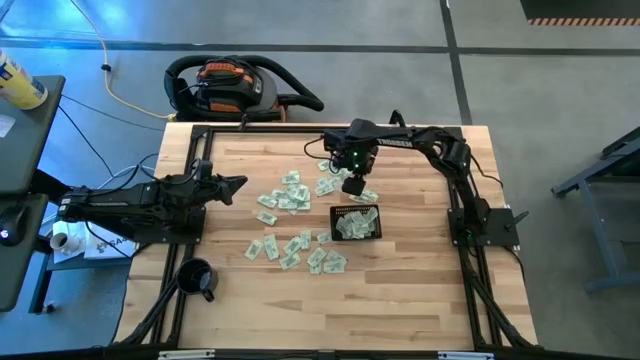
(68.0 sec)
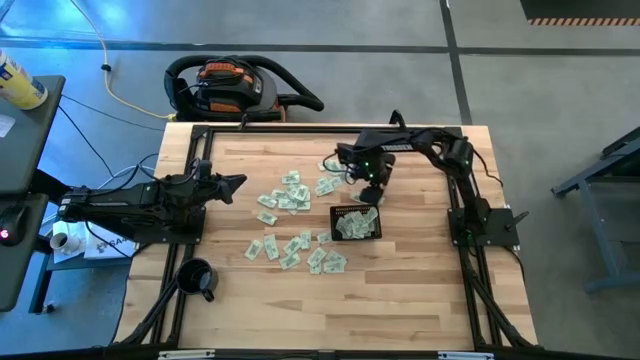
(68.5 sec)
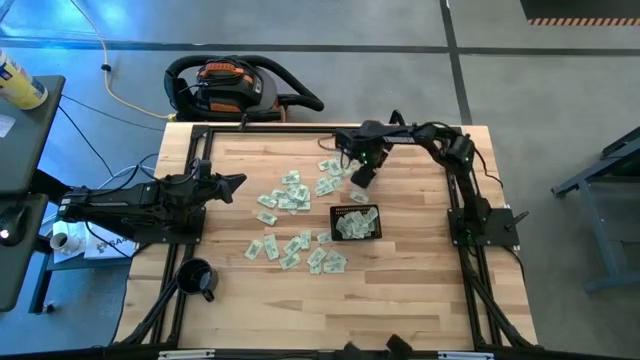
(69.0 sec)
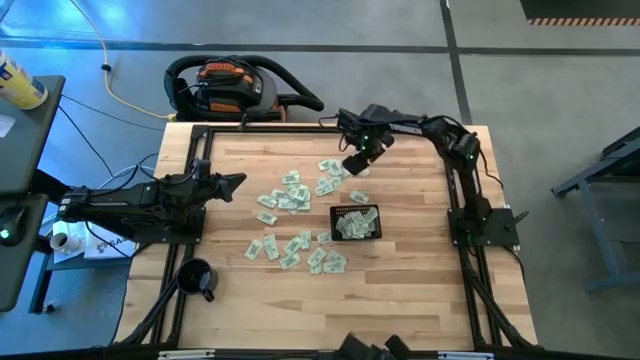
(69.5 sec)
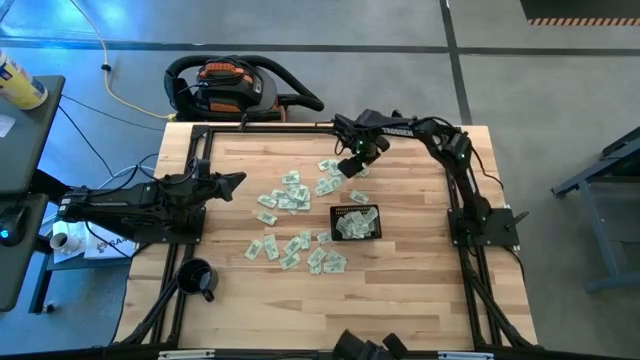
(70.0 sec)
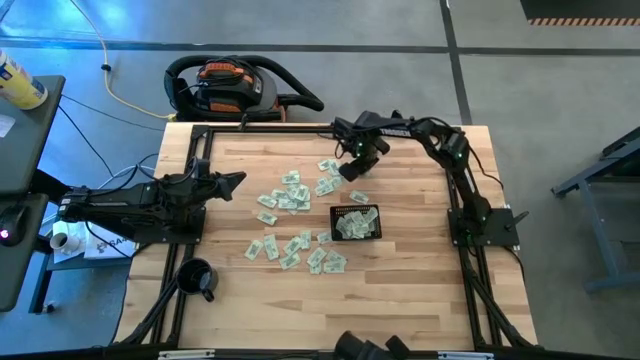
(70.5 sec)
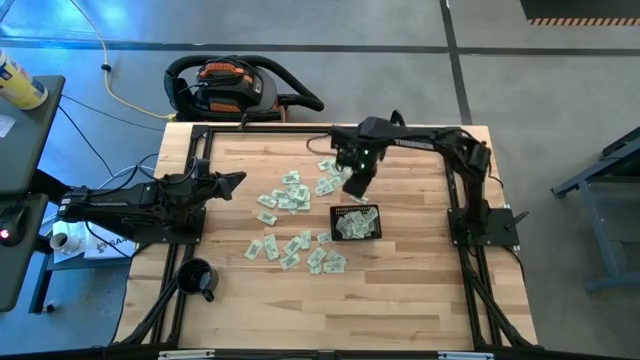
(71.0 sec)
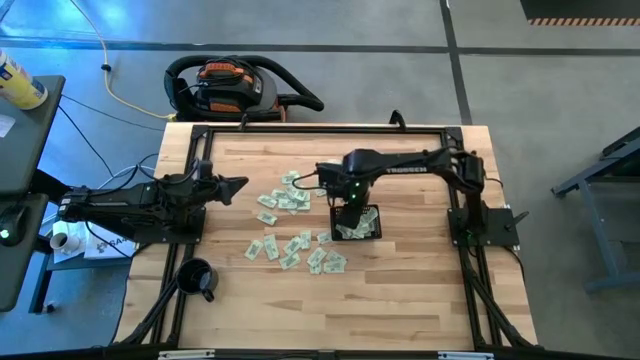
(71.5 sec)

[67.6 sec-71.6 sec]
Task: Pick and place Stevia / Truvia into bins
Put the green stevia packet into the black bin

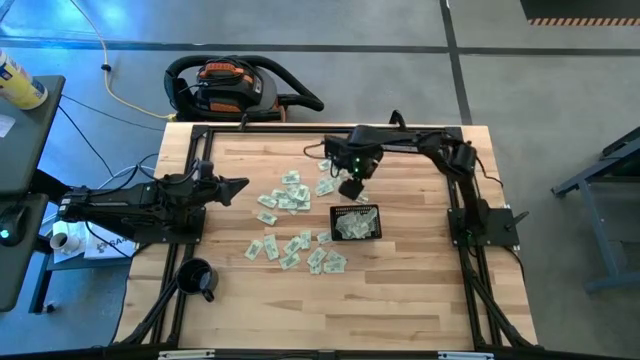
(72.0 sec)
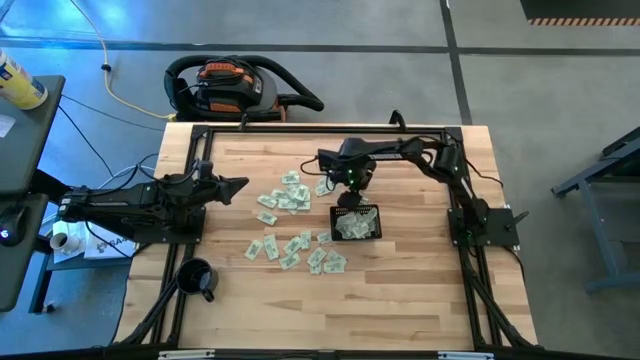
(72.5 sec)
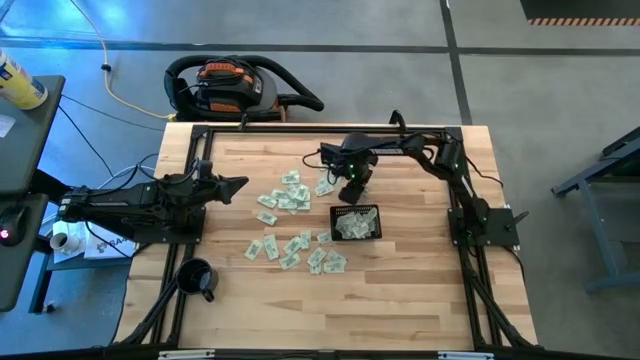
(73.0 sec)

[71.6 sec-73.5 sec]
Put the green stevia packet into the black bin

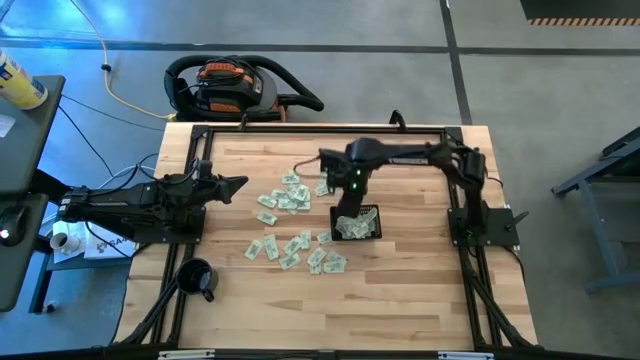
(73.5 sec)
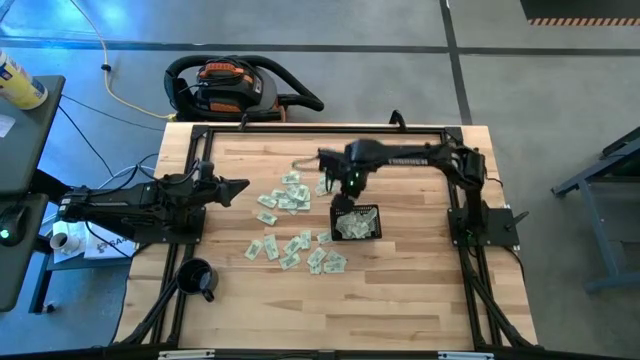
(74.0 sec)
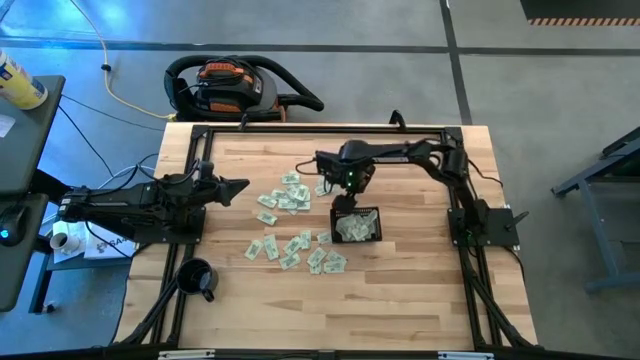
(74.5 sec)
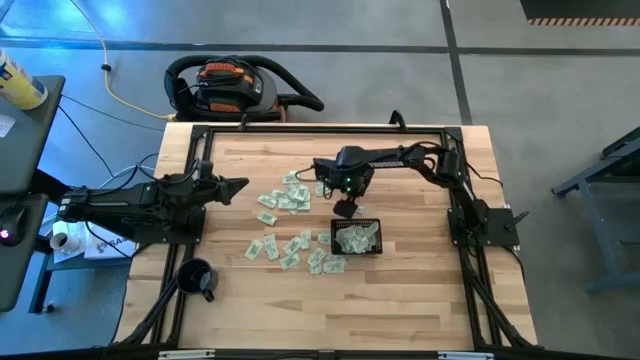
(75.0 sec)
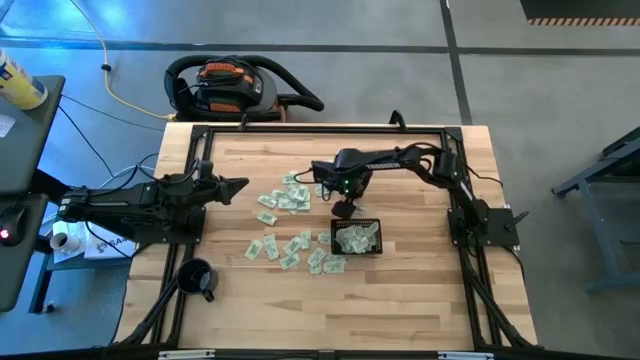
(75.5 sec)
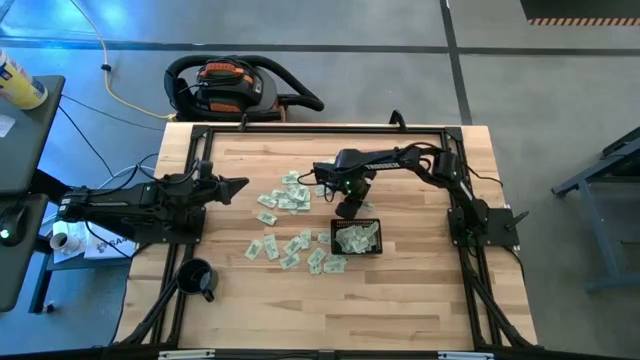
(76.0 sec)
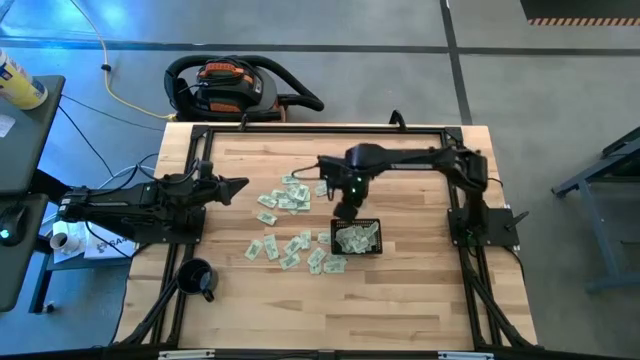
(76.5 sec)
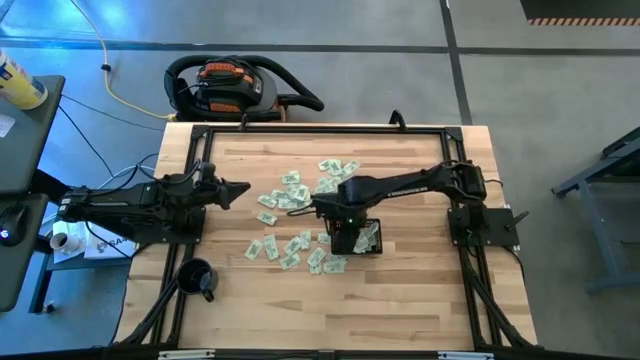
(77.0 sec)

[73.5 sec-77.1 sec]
Put the green stevia packet into the black bin

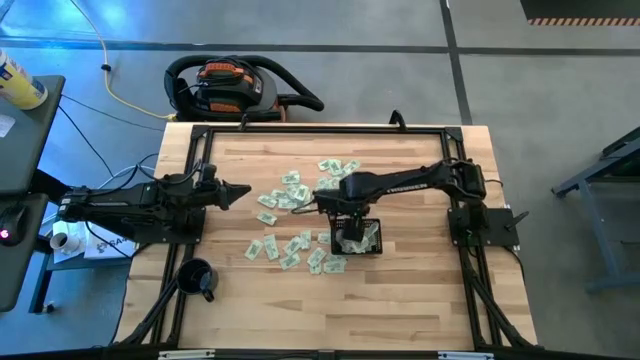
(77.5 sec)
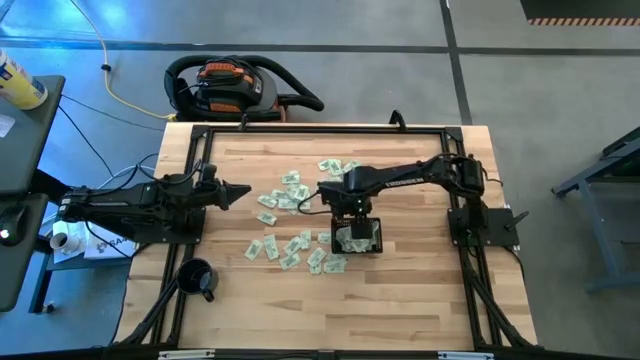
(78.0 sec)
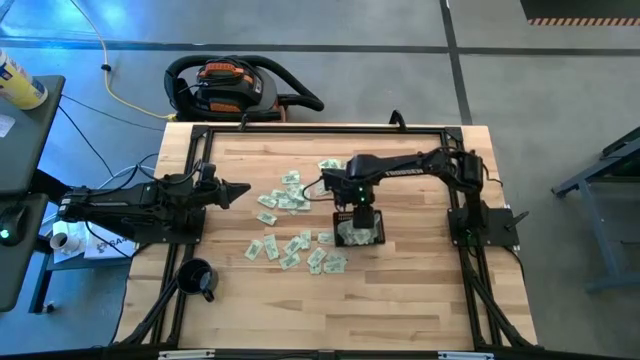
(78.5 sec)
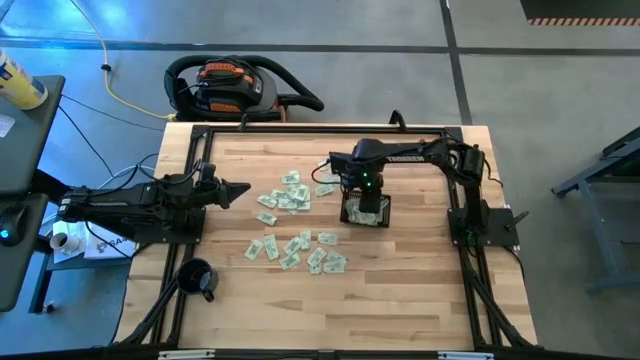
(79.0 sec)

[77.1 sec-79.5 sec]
Adjust the black bin

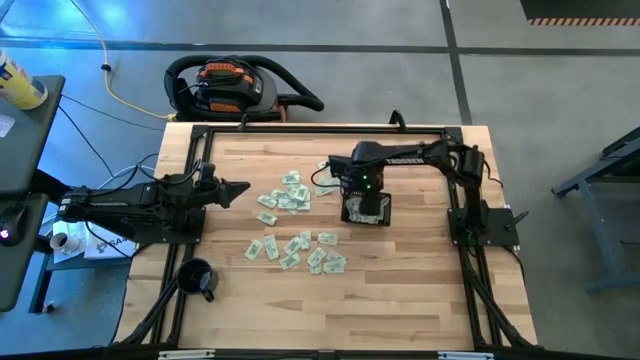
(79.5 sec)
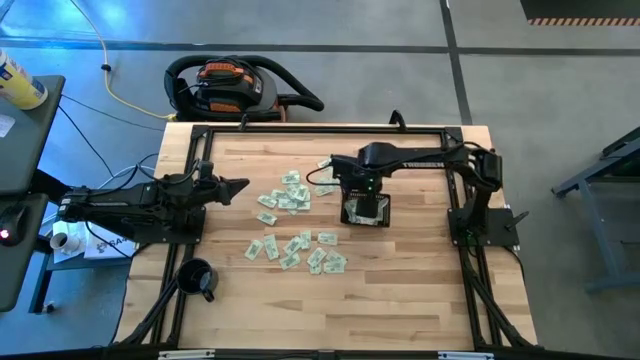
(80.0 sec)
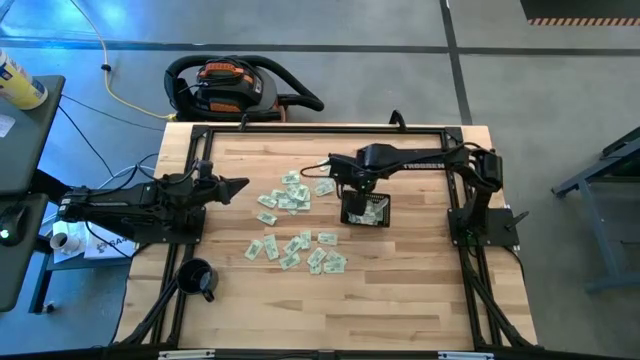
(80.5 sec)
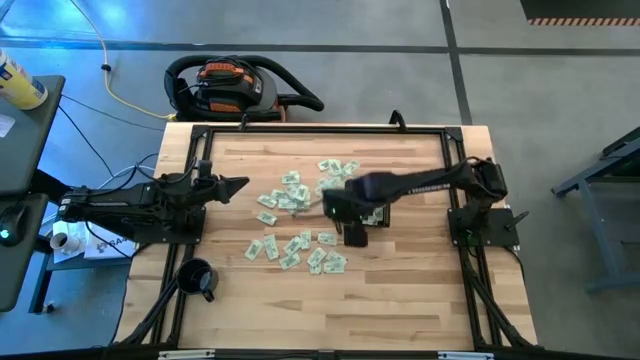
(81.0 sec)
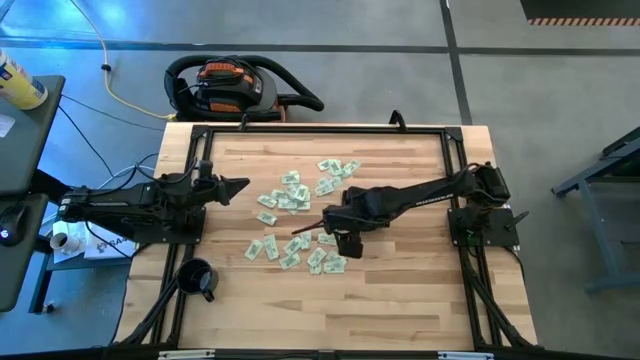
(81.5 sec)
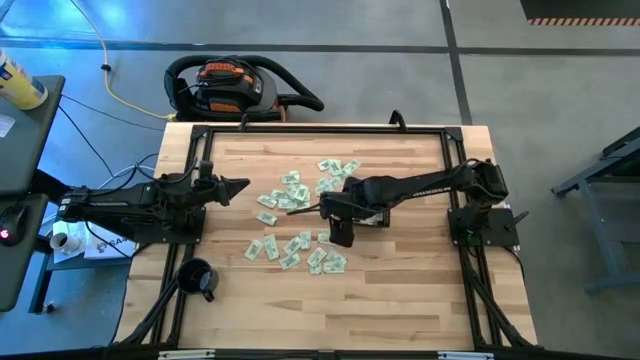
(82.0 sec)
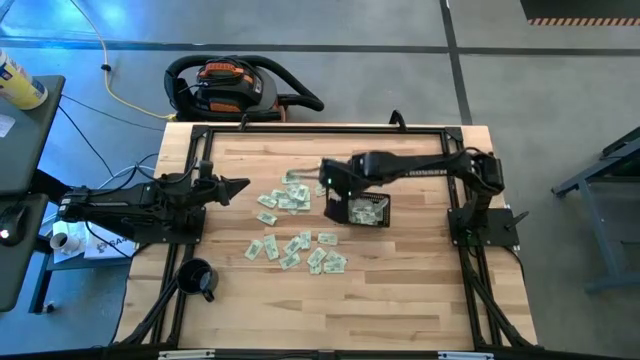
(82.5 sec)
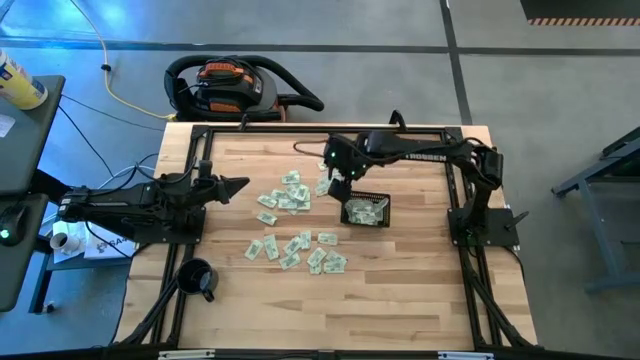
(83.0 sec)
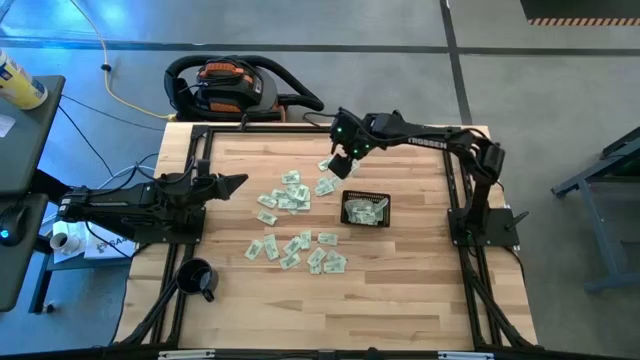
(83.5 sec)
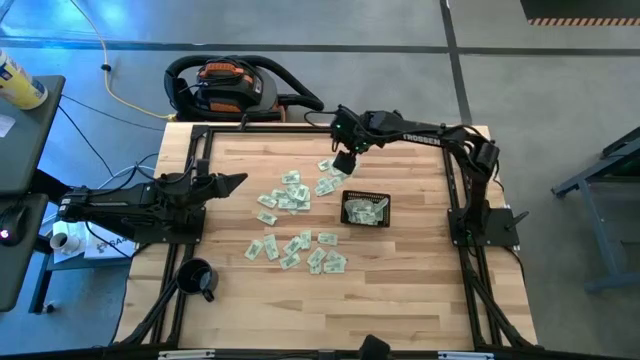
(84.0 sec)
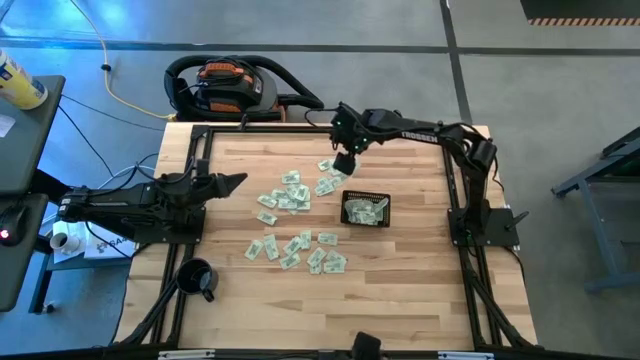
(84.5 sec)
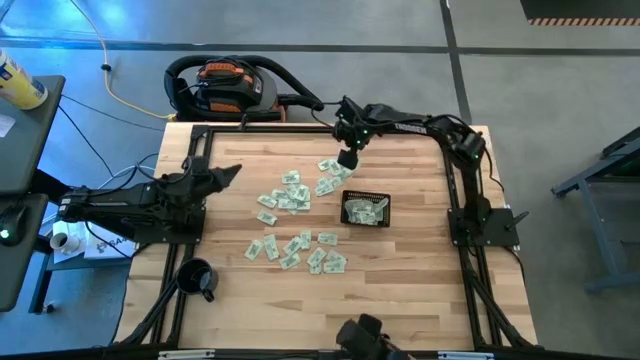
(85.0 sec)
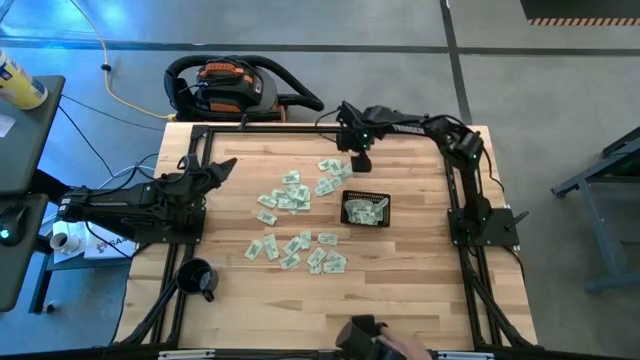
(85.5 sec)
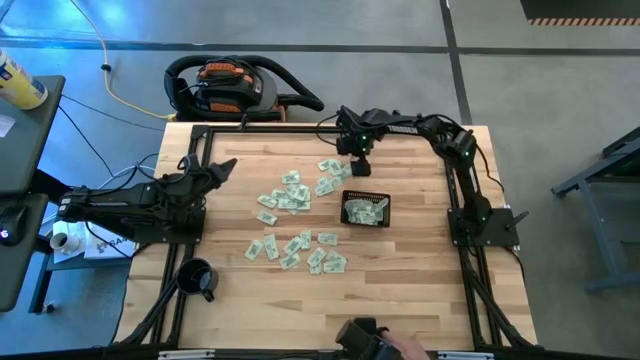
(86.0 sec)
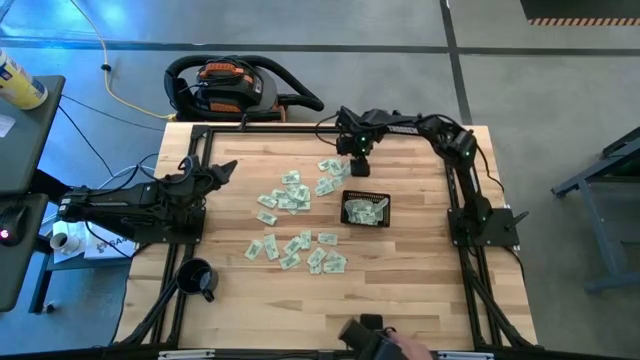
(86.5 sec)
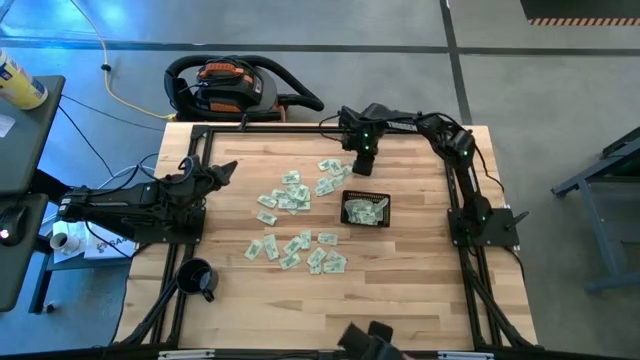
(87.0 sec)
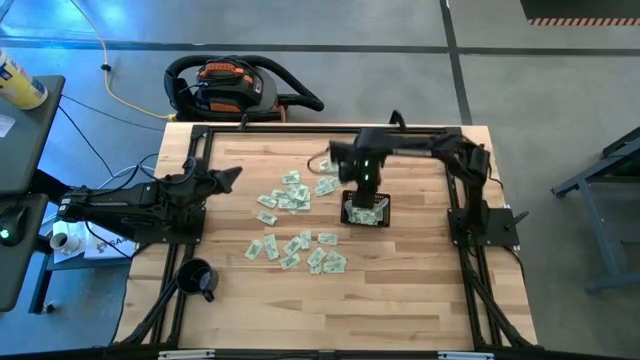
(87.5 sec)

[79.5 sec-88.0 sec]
Put the green stevia packet into the black bin

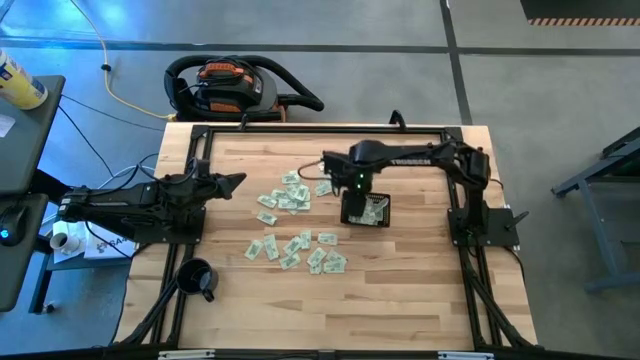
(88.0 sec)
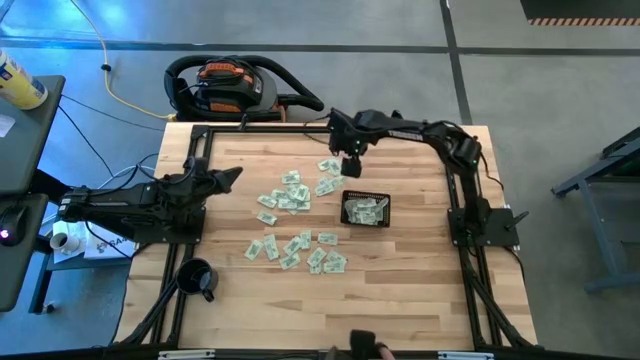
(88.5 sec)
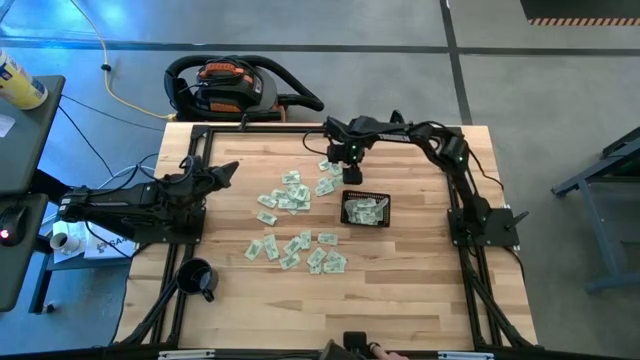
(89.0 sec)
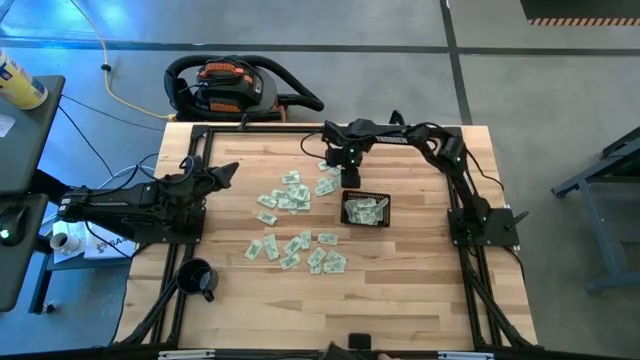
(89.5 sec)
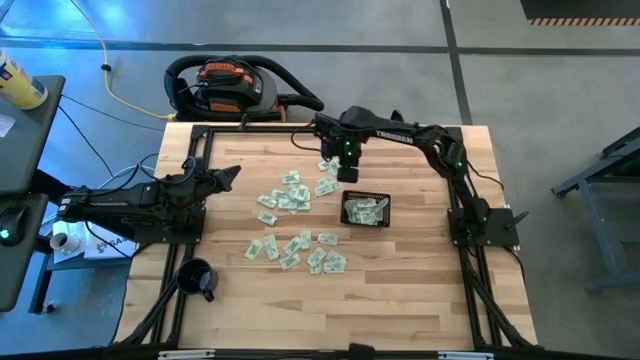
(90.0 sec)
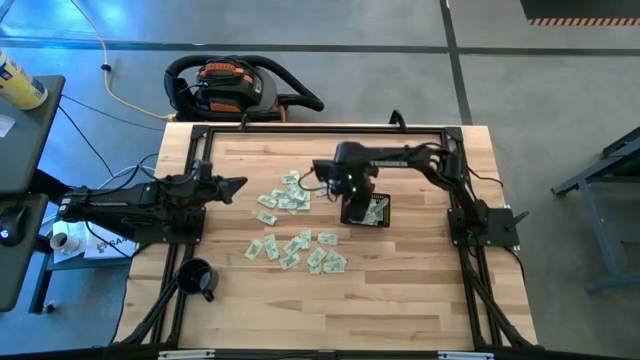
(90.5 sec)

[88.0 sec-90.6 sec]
Put the green stevia packet into the black bin
